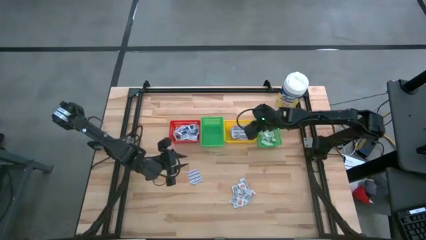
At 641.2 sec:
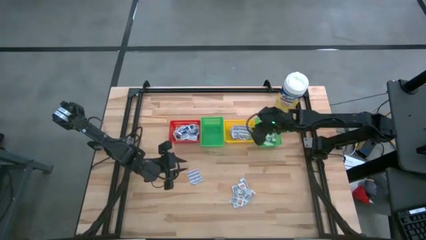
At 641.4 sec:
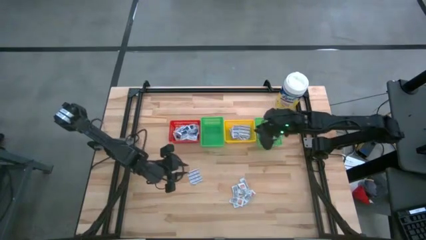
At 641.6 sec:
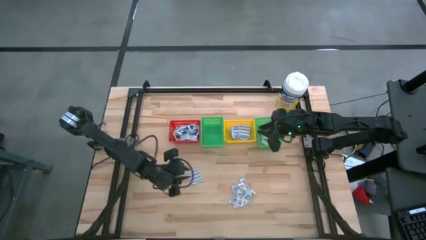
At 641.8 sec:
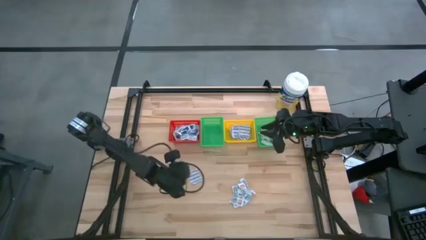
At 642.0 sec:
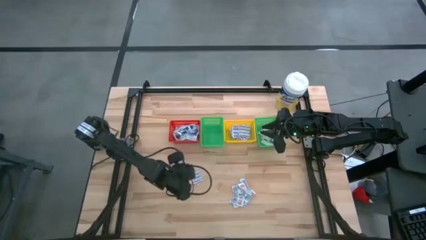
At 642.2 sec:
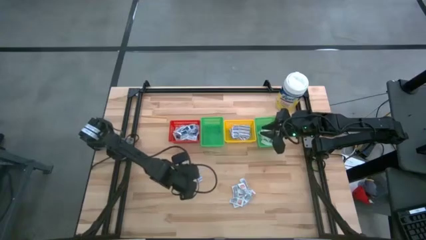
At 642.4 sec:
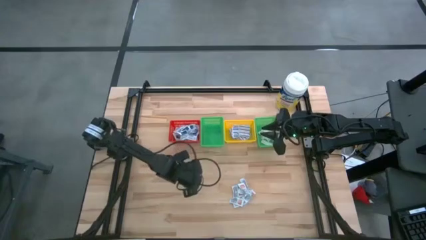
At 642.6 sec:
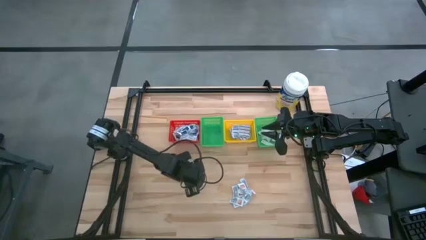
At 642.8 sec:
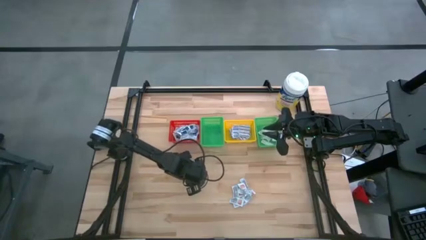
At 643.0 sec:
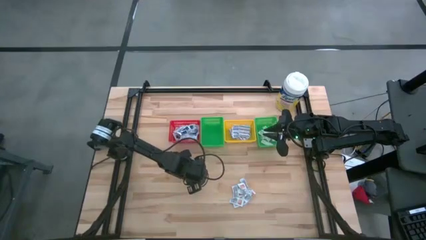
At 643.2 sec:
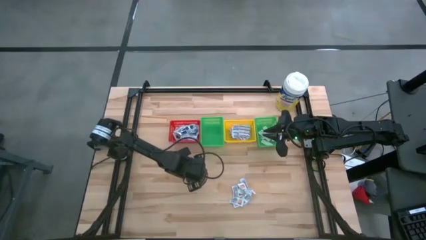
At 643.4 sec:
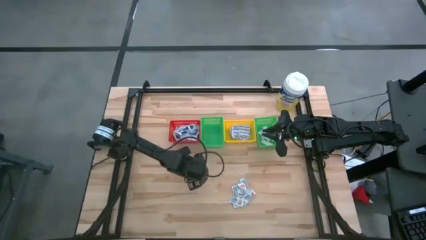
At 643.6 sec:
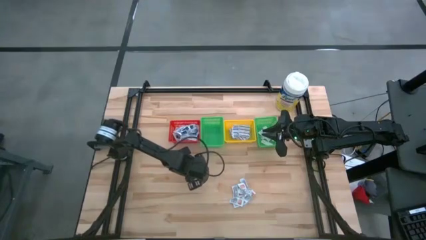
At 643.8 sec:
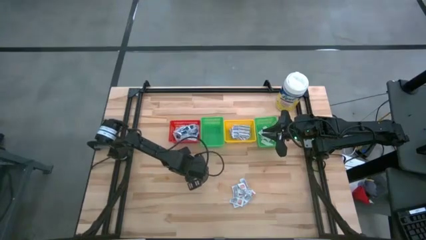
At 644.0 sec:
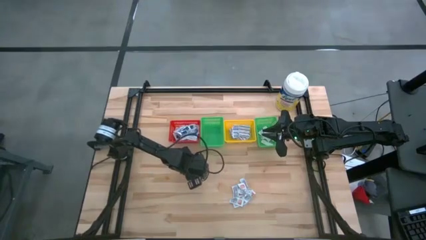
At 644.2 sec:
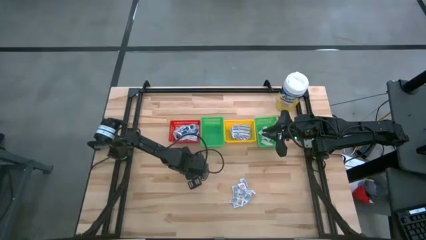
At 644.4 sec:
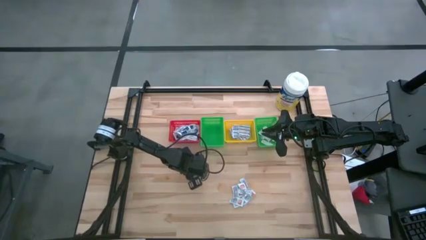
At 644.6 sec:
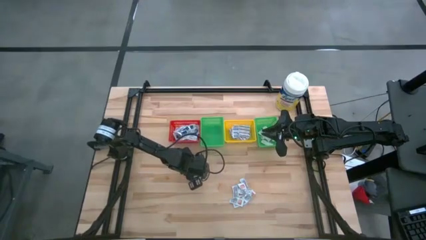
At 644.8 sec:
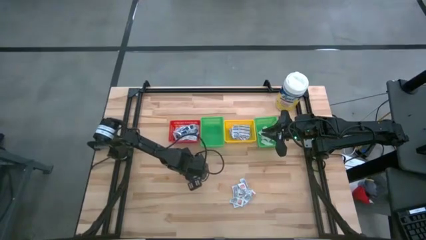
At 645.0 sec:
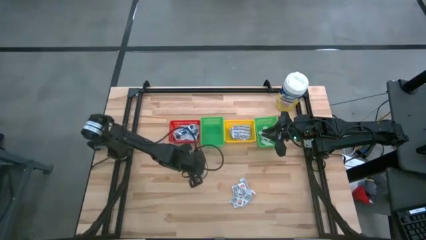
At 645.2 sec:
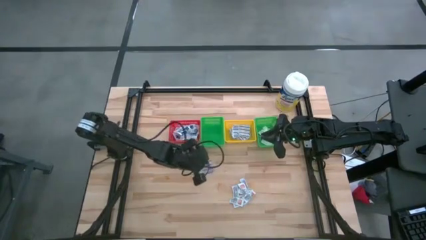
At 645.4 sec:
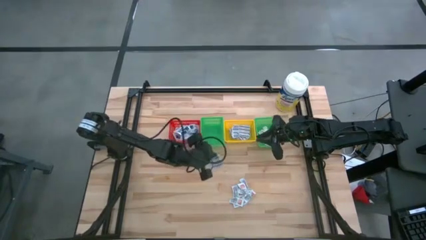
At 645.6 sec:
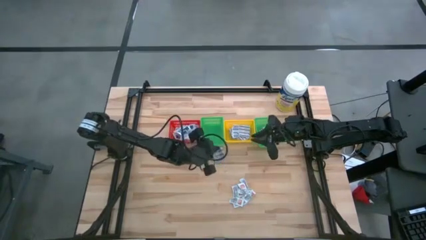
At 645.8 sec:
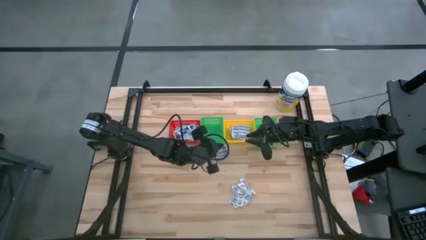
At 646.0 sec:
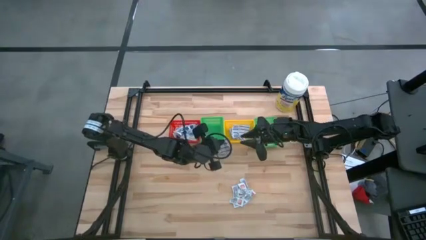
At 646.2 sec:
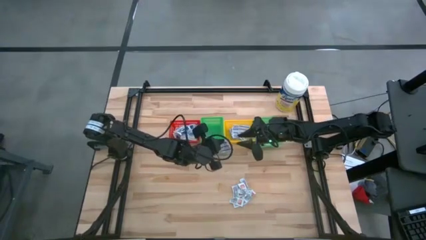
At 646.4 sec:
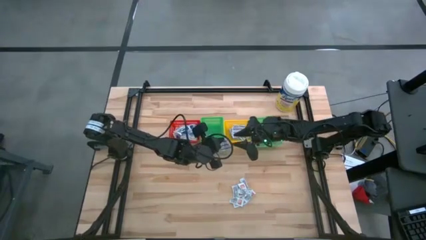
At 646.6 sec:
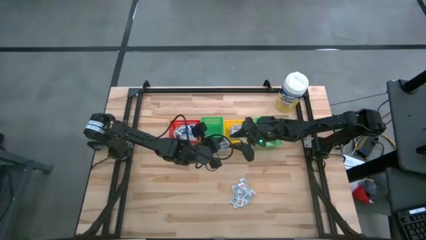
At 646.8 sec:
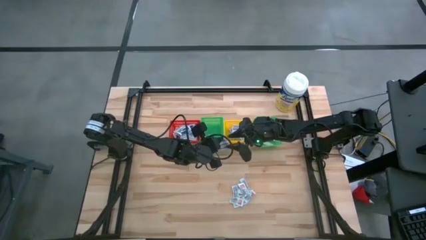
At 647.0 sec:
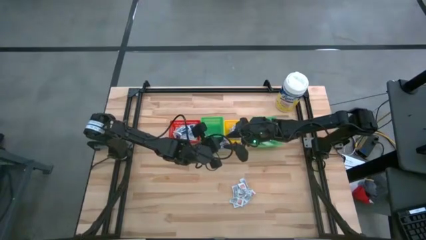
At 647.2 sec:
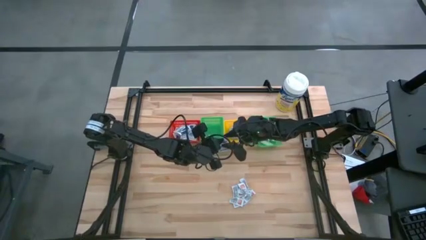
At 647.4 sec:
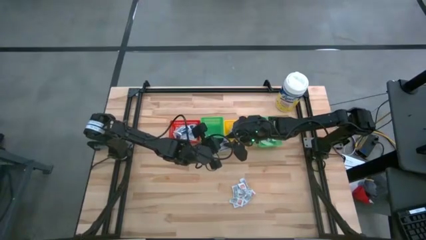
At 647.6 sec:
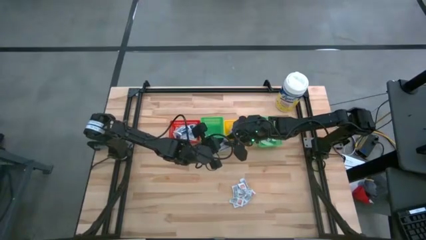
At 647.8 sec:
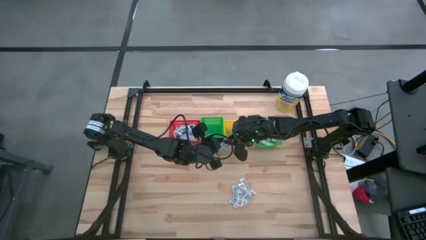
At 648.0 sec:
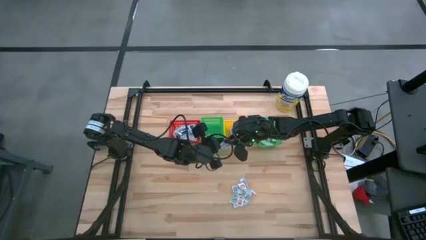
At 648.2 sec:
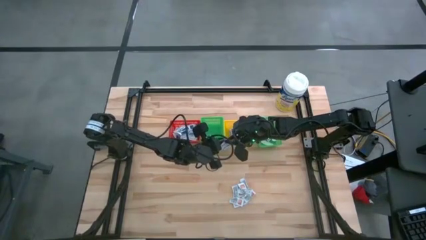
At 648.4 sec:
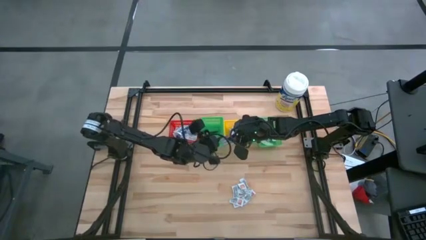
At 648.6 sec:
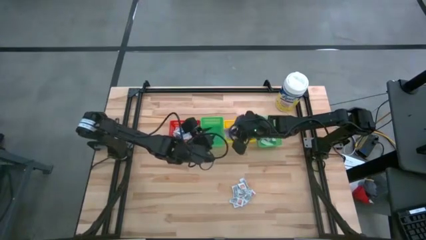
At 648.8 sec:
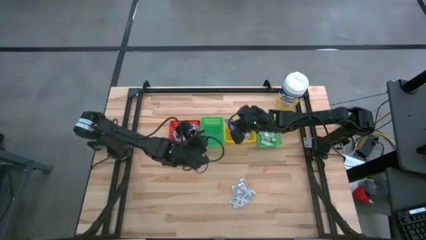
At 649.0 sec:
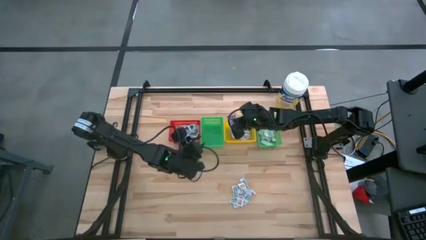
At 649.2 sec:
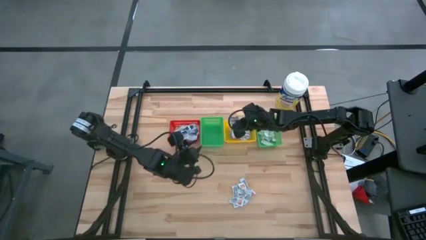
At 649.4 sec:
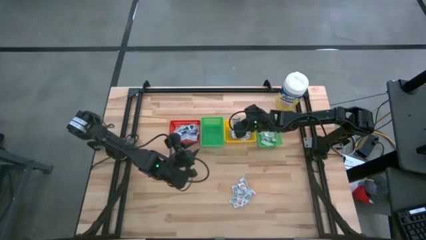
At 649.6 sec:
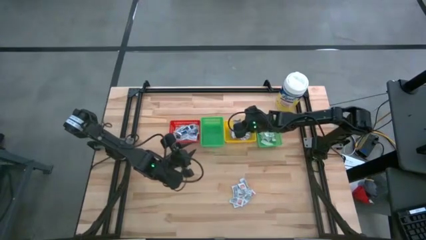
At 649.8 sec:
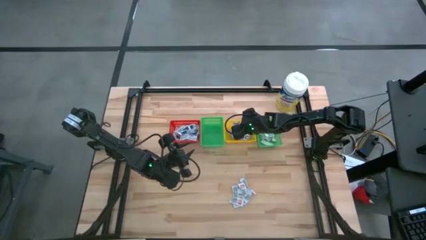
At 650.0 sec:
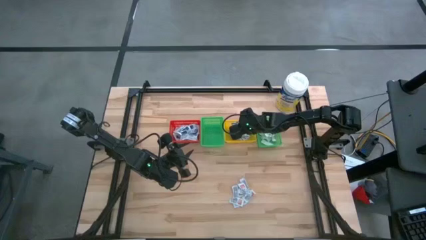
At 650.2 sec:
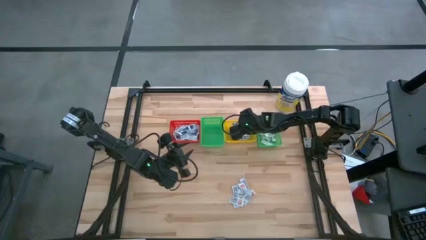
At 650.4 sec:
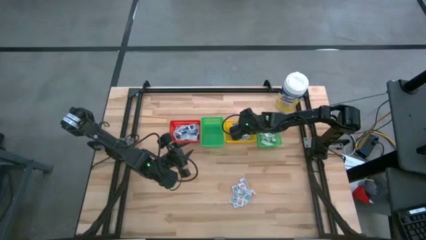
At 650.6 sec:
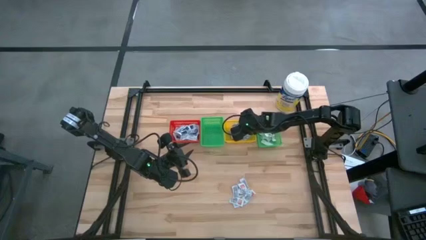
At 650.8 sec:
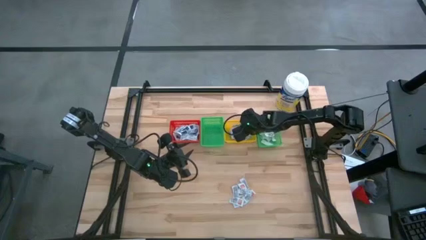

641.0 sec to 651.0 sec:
Task: Pick & Place First Aid Supplies
Put the blue bandage into the yellow basket

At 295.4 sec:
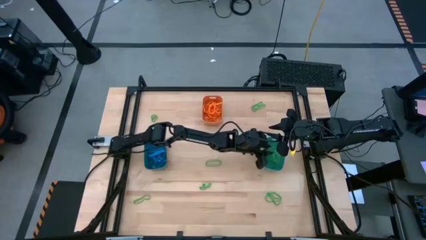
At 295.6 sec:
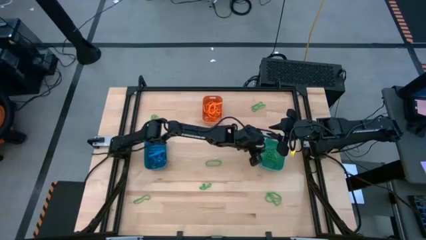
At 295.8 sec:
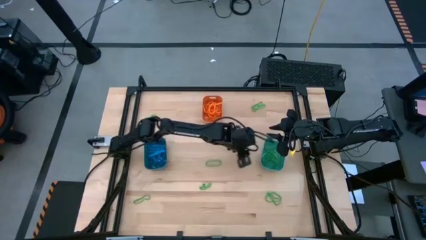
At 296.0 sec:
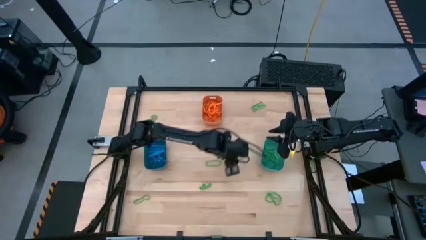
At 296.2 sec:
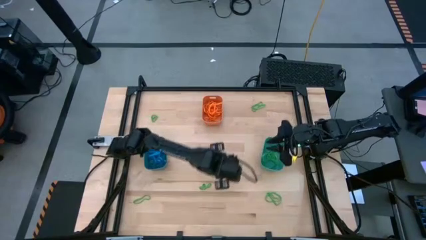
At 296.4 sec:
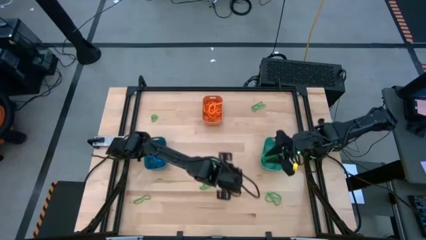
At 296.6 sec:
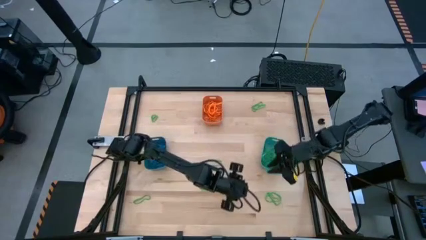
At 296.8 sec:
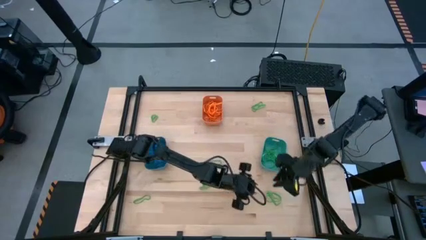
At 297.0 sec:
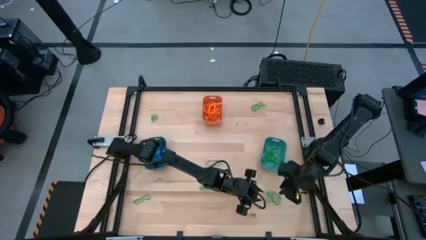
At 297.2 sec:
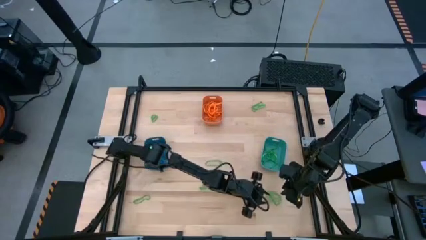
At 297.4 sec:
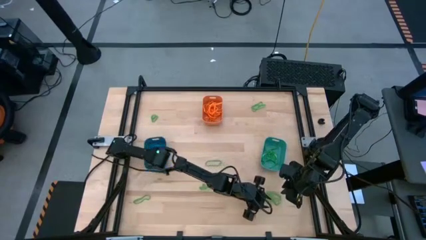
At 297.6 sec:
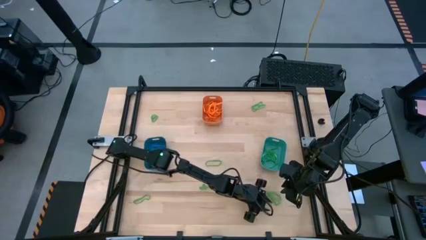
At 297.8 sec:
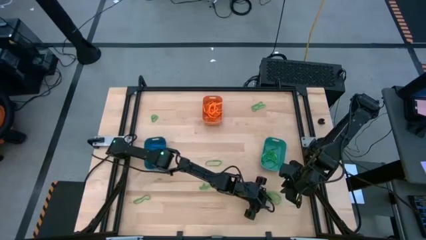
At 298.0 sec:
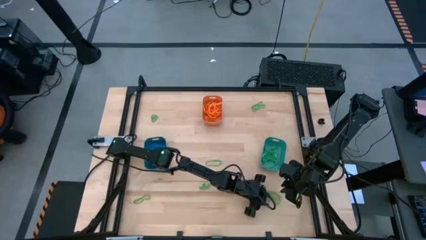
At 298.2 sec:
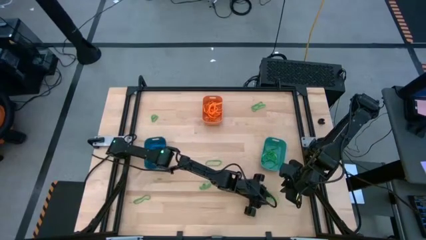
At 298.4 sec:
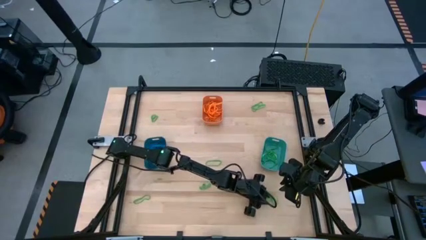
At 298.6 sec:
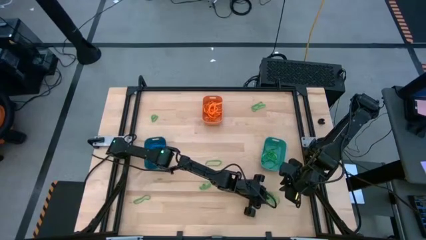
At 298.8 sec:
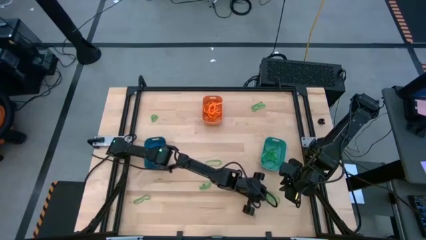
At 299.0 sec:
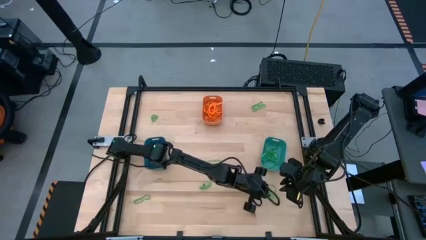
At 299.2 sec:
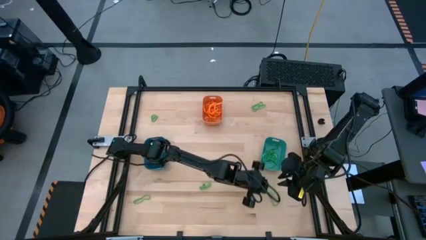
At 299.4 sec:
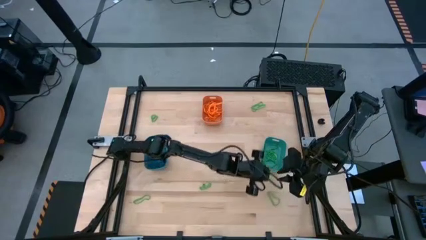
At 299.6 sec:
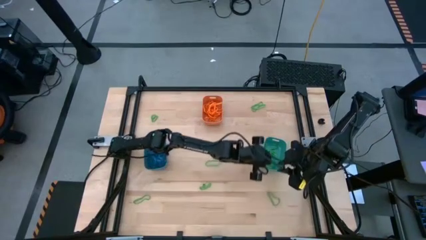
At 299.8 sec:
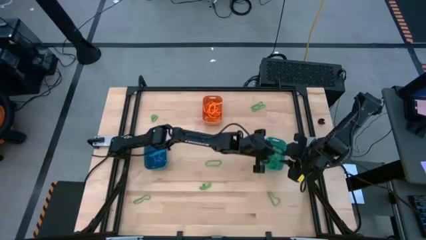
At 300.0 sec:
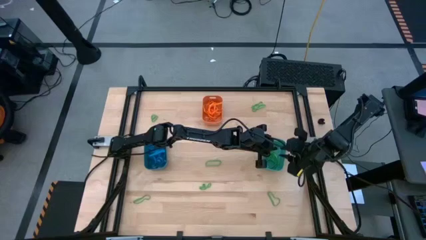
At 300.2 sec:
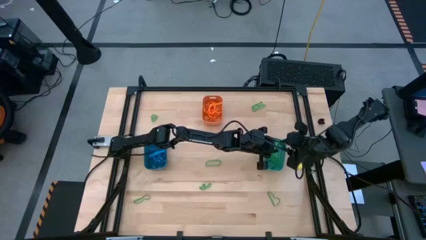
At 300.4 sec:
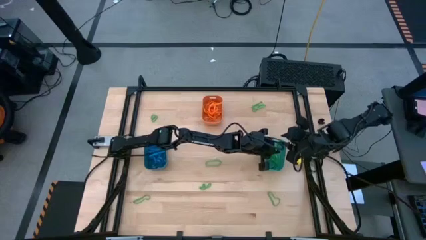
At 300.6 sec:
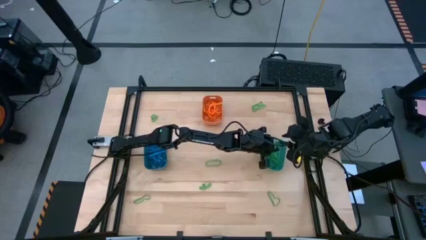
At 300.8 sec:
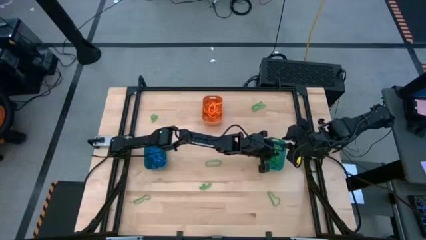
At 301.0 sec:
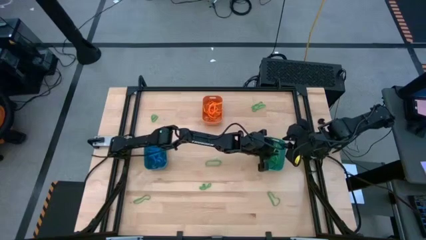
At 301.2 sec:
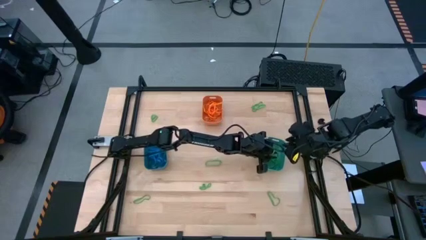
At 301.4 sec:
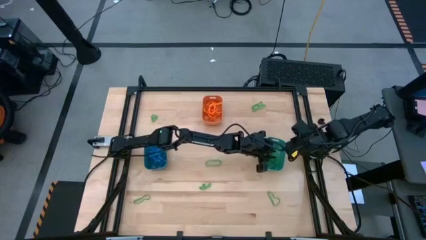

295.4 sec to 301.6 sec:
Task: Sort rubber bands into baskets
Put the green rubber band into the green bin
